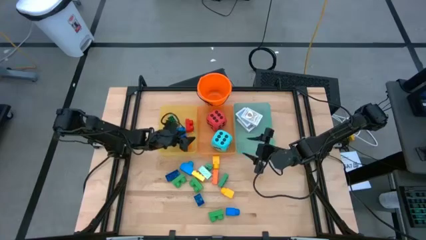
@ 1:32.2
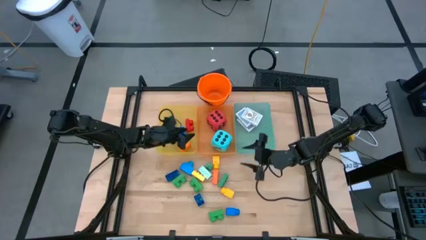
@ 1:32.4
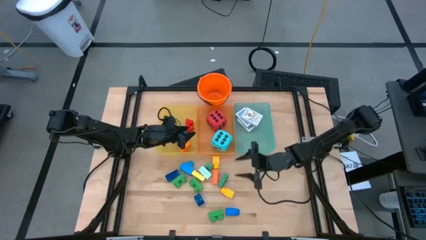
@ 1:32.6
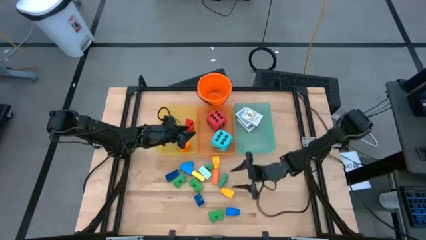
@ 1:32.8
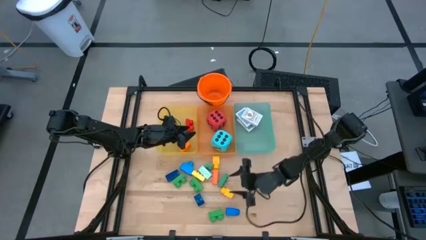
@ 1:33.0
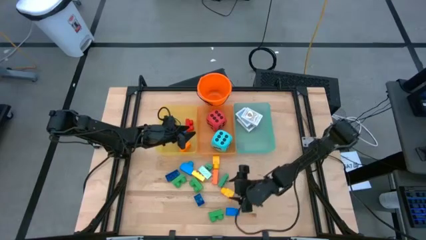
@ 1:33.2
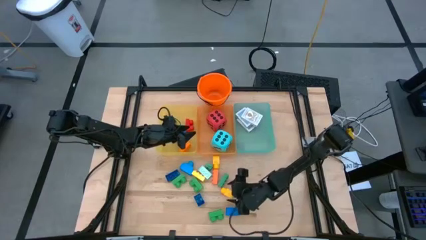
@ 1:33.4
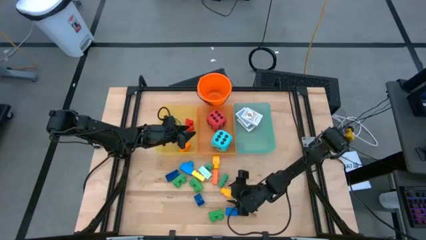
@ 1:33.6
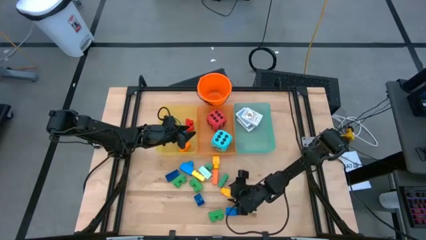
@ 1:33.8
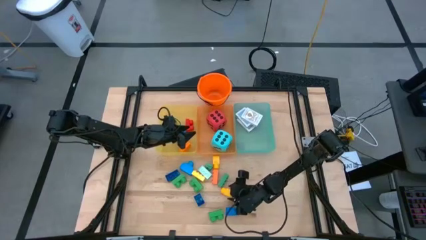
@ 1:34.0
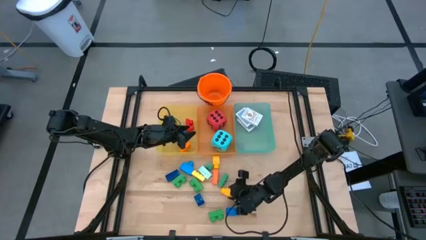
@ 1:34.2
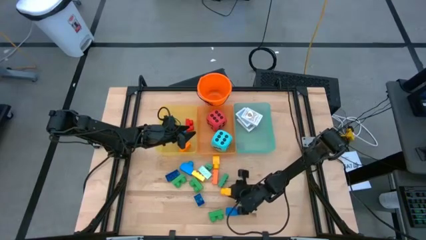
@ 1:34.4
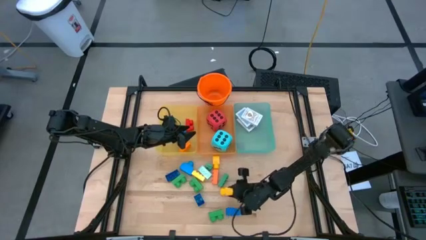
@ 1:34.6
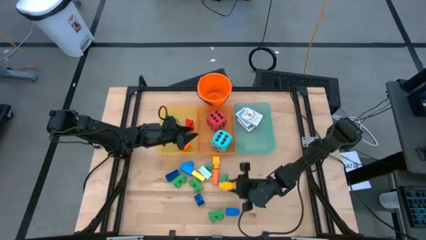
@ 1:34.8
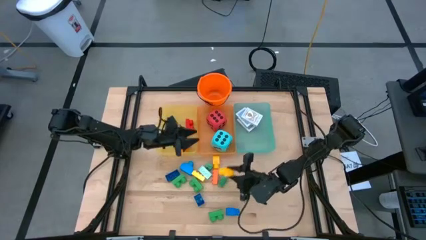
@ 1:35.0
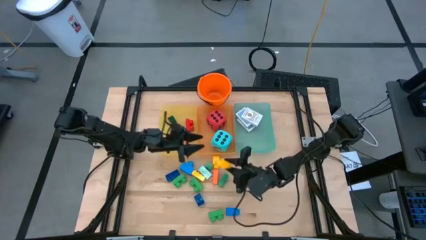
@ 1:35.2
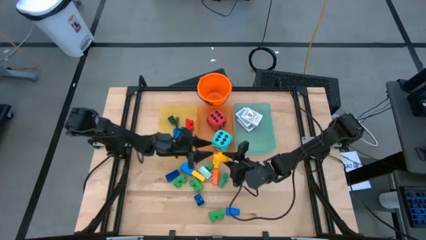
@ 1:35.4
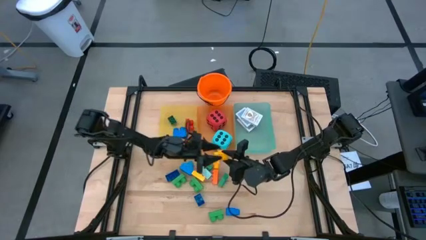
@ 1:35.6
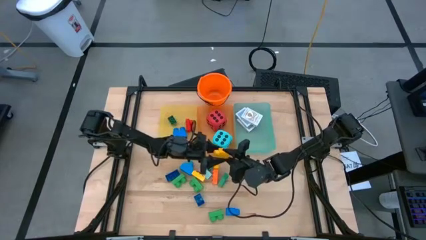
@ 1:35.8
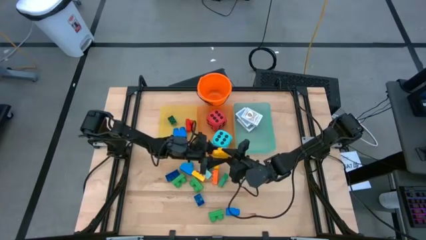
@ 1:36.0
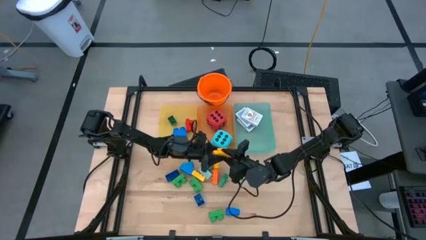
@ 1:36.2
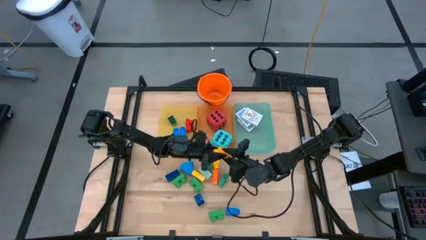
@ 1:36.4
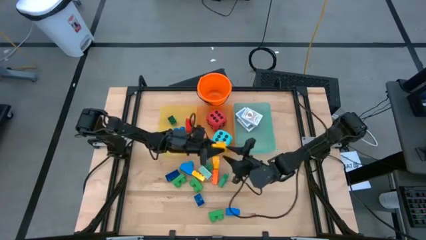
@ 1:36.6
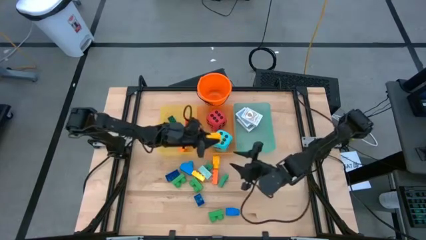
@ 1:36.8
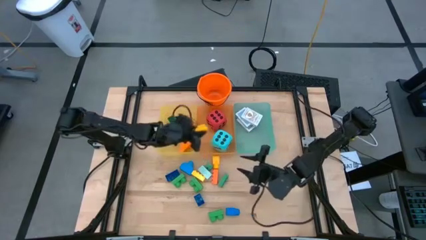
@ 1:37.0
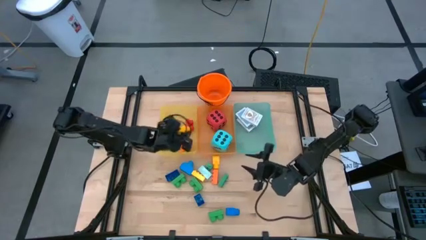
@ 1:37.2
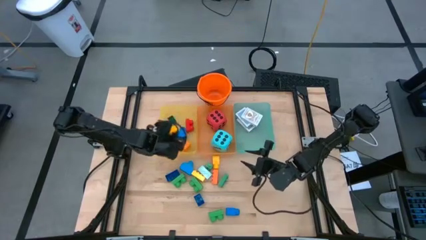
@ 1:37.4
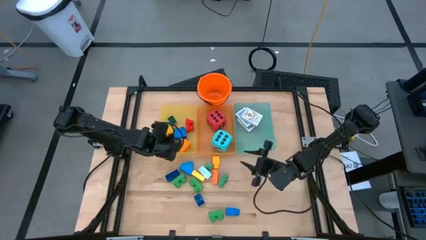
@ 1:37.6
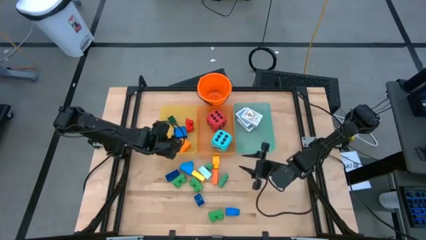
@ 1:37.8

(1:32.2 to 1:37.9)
Task: Pick & Place Toys
Put the bottom yellow game piece into the yellow bin

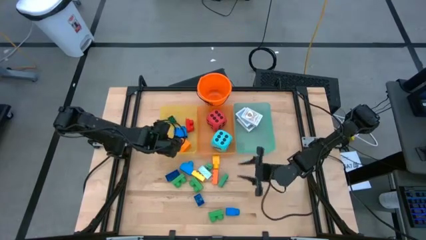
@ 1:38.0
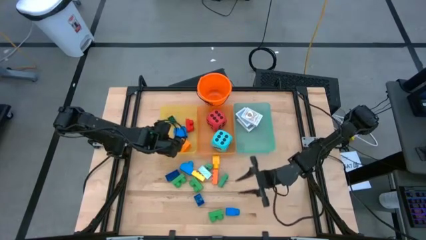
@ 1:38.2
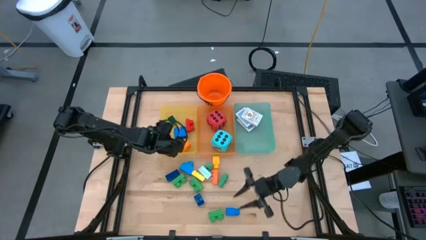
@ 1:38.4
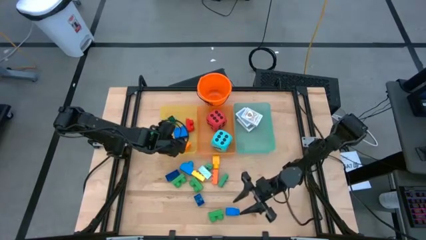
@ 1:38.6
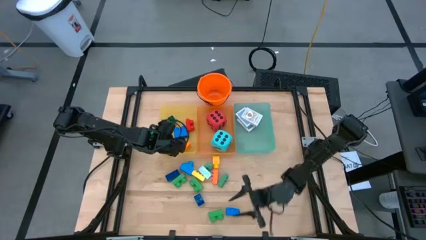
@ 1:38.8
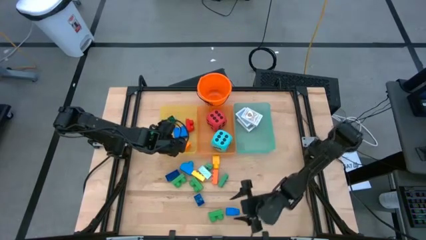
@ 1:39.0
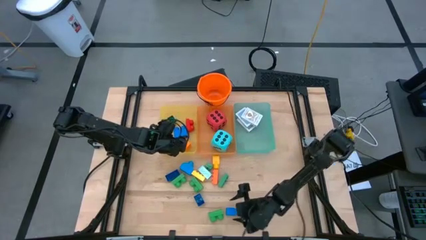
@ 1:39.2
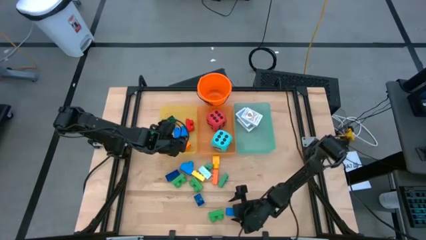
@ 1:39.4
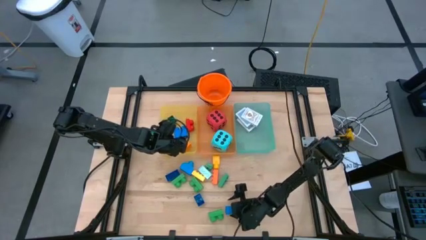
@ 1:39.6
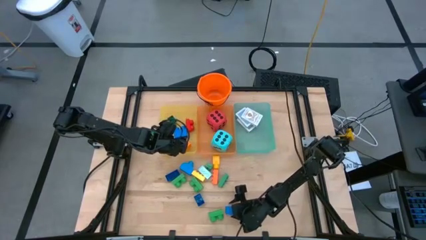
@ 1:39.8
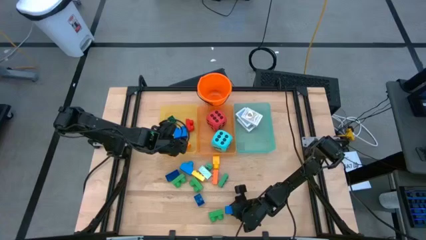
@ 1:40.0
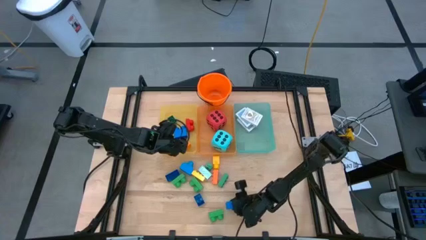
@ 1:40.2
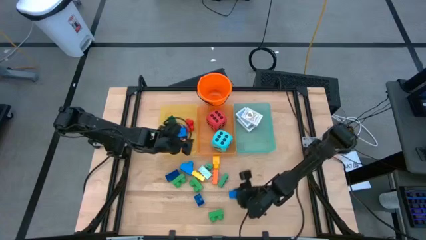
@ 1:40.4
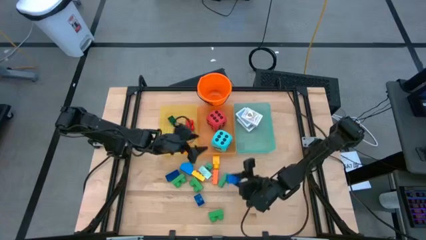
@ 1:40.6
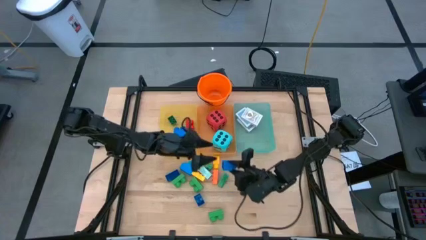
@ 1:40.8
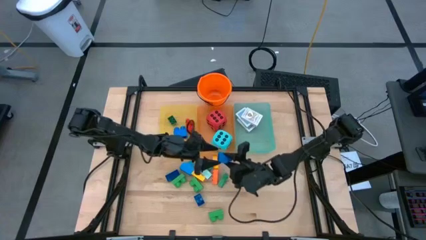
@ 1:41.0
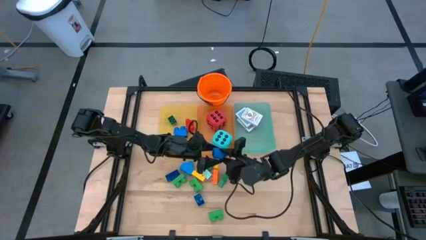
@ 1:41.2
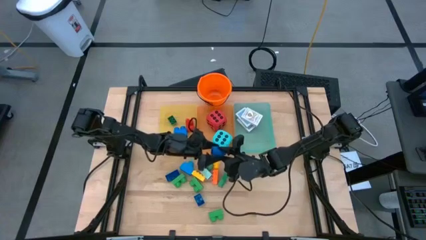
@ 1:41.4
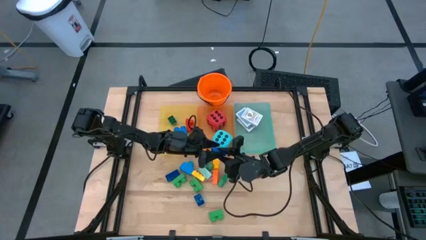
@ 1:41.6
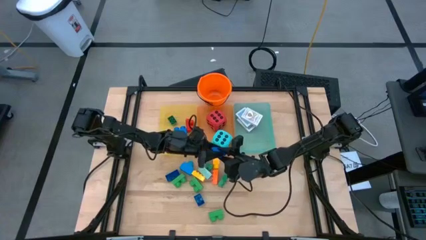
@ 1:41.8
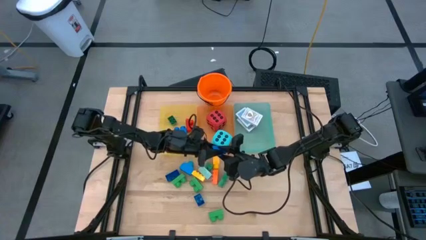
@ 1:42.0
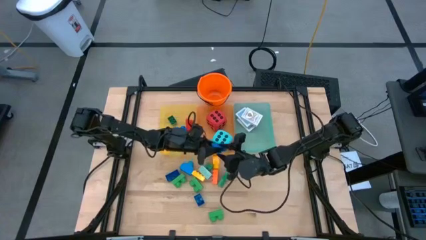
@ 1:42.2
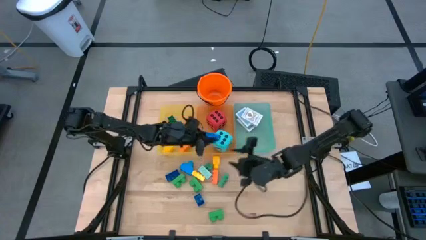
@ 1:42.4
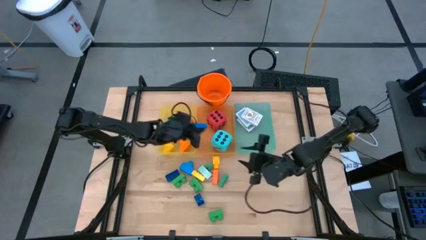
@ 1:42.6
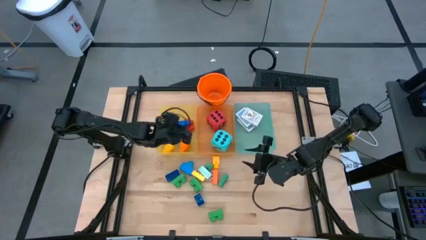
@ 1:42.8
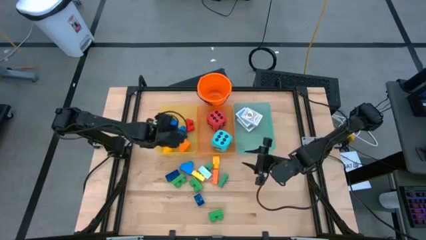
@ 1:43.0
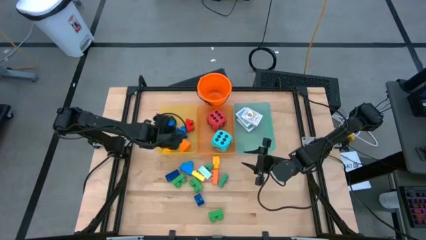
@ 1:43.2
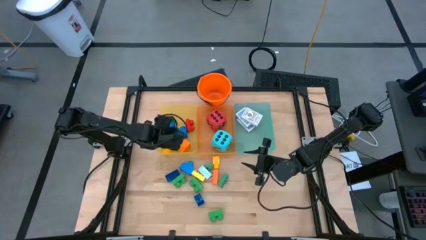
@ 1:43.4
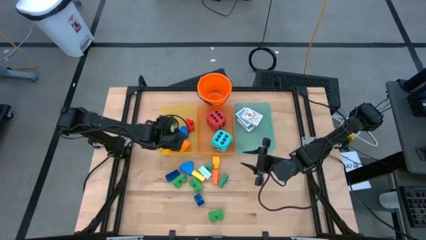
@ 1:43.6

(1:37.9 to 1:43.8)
Put the bottom blue game piece into the yellow bin

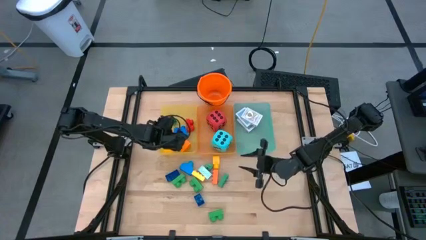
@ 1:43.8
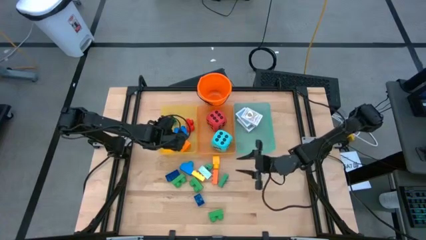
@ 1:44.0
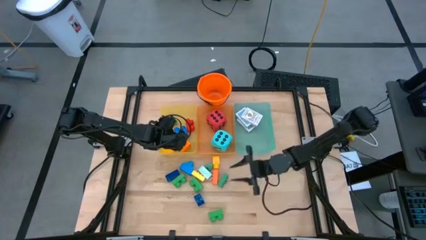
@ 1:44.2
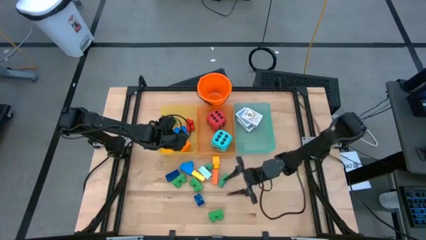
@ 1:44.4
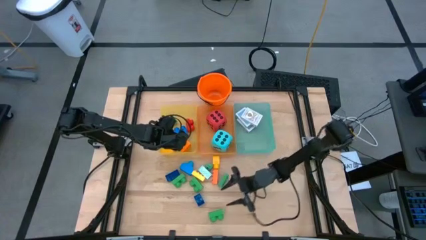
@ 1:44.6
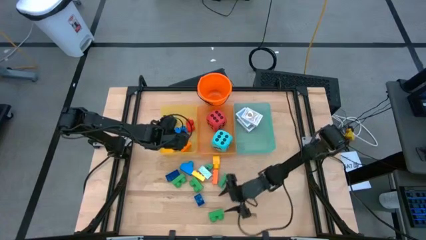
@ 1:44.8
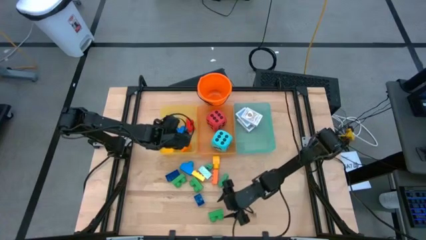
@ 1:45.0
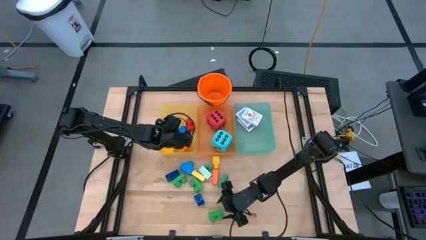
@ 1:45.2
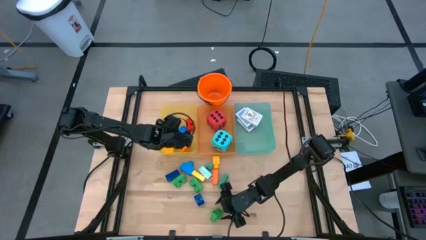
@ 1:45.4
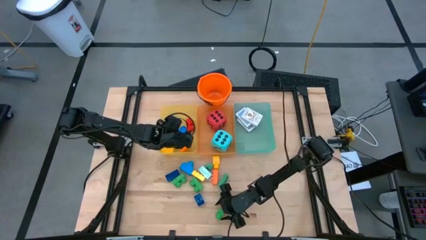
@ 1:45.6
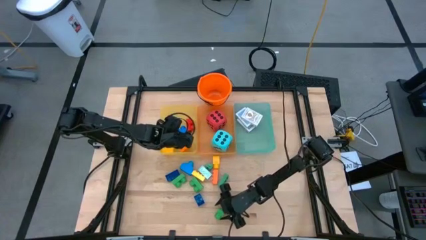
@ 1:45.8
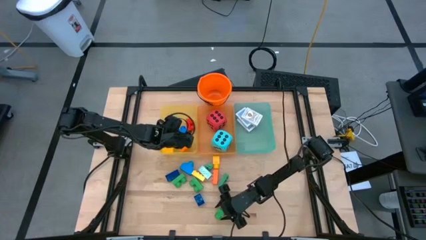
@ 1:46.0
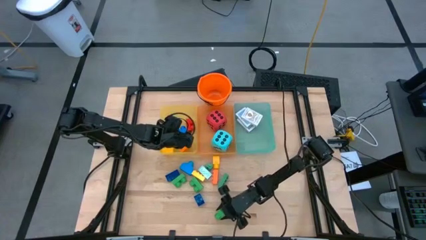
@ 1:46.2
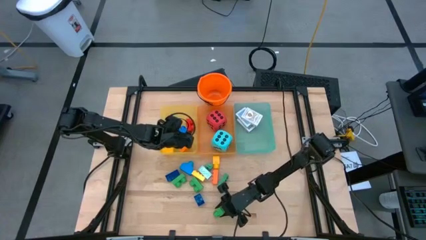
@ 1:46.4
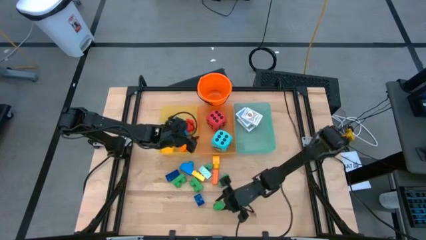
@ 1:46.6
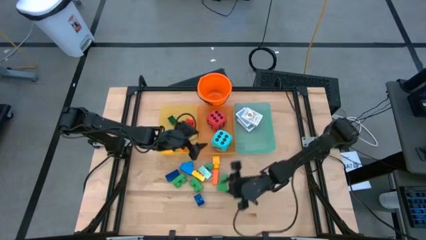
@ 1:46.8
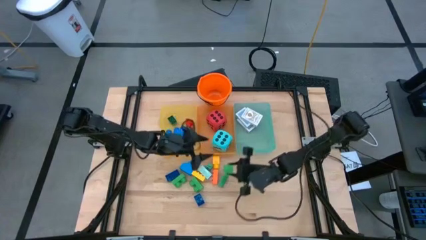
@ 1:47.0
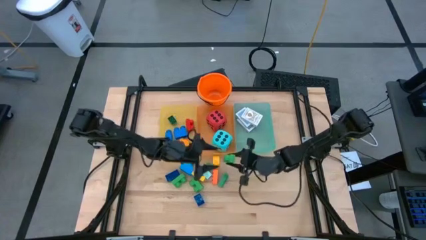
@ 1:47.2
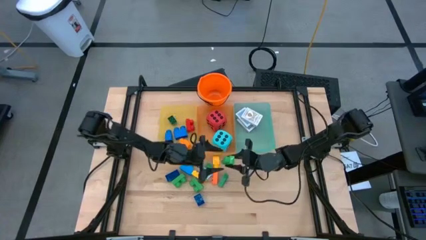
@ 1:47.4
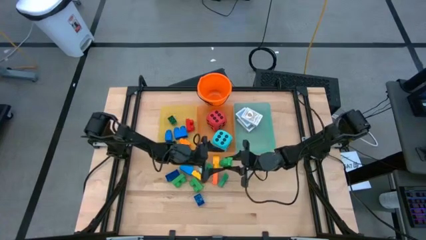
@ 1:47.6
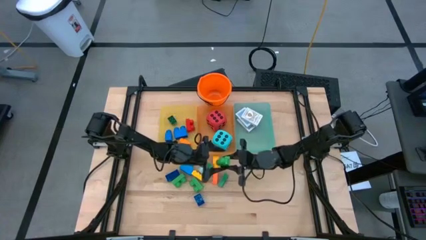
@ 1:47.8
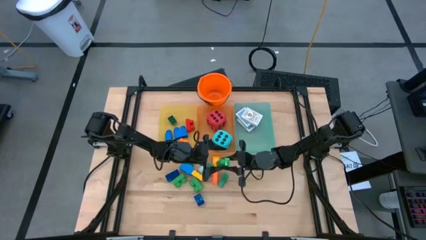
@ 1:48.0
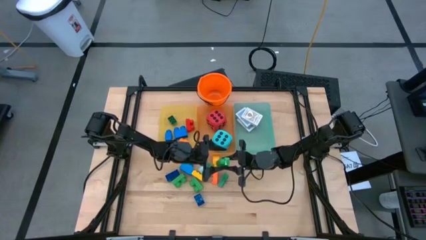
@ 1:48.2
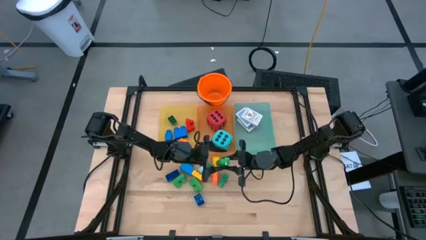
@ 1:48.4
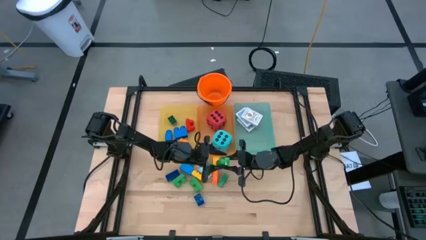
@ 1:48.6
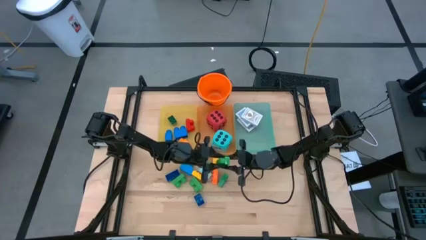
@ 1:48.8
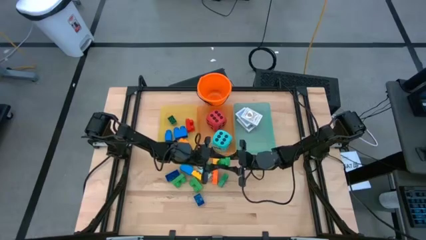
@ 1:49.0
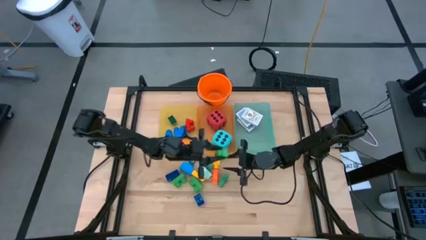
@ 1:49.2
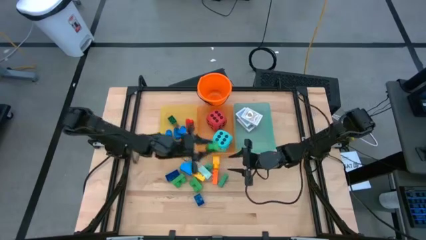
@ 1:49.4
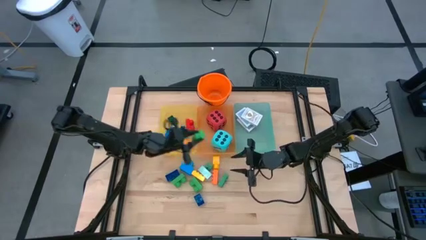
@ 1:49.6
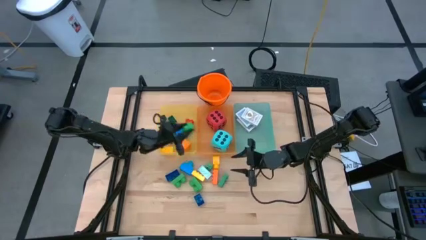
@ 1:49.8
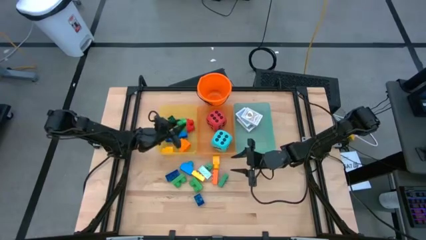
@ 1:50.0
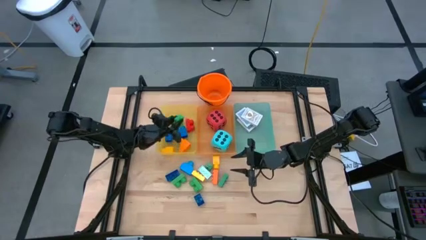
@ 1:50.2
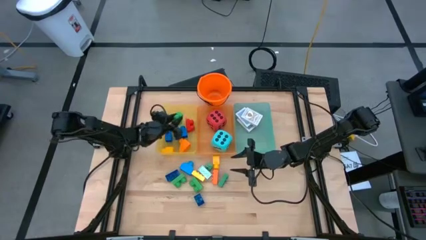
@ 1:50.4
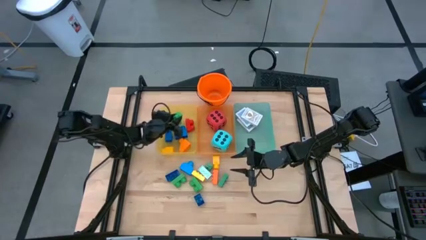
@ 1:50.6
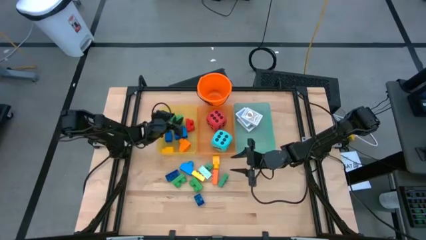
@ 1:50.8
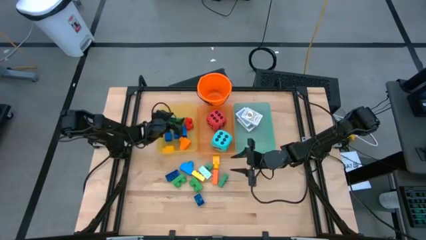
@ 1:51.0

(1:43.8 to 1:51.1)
Put the bottom green game piece into the yellow bin
